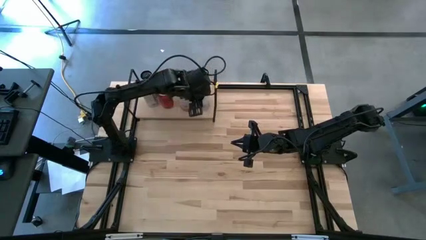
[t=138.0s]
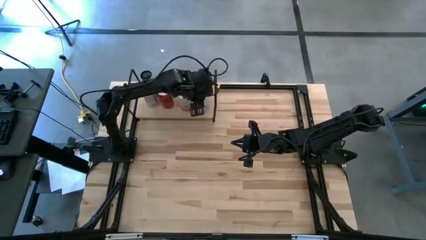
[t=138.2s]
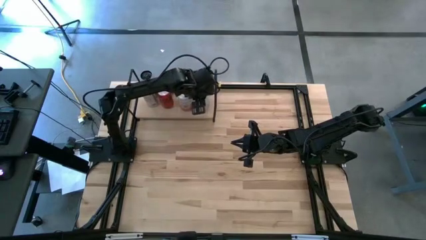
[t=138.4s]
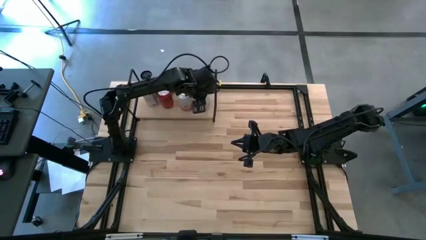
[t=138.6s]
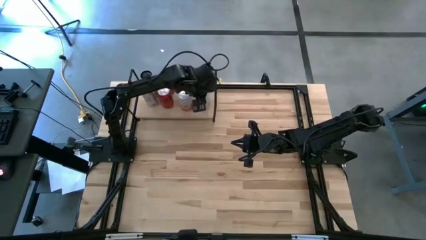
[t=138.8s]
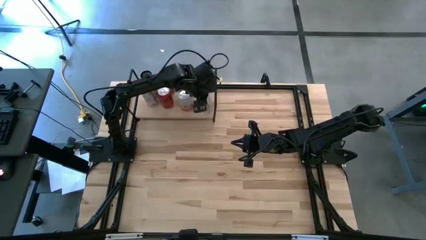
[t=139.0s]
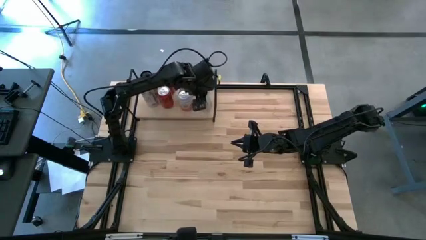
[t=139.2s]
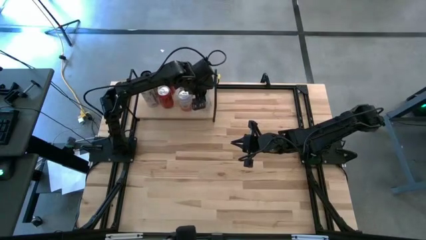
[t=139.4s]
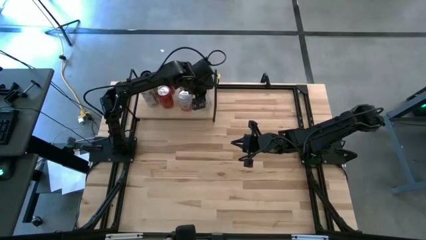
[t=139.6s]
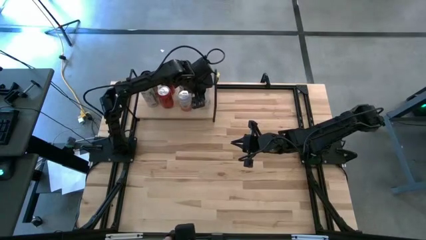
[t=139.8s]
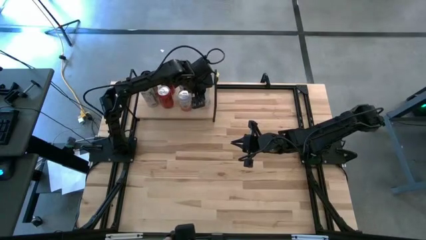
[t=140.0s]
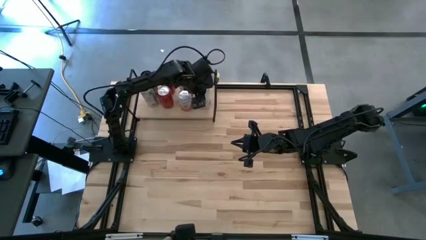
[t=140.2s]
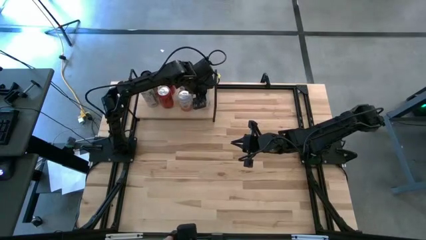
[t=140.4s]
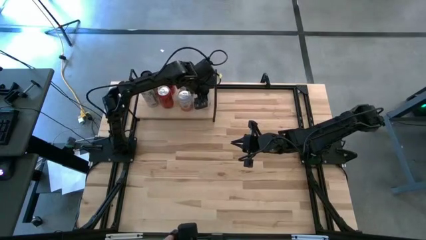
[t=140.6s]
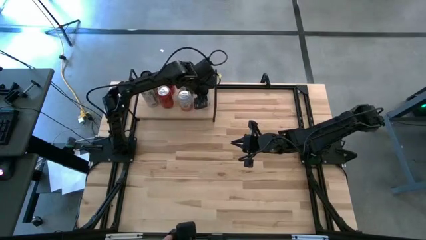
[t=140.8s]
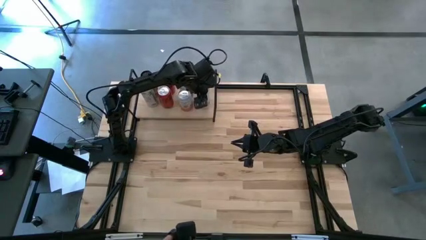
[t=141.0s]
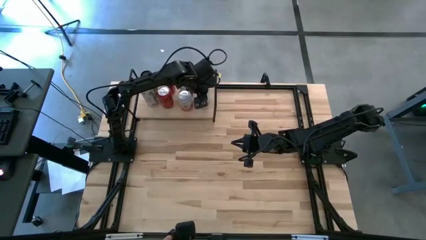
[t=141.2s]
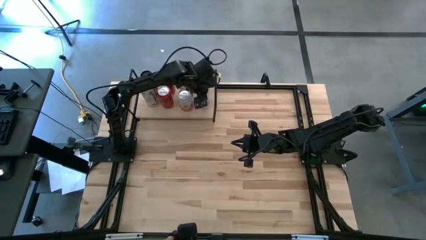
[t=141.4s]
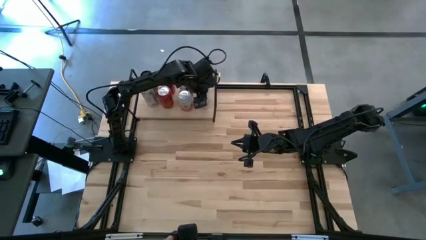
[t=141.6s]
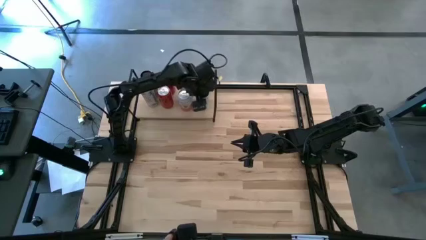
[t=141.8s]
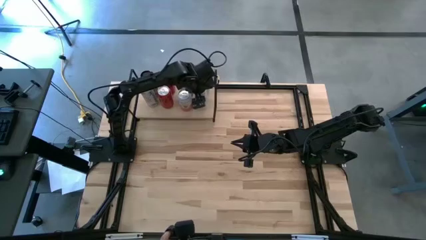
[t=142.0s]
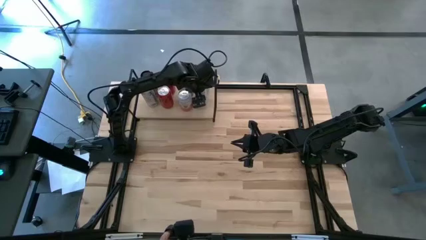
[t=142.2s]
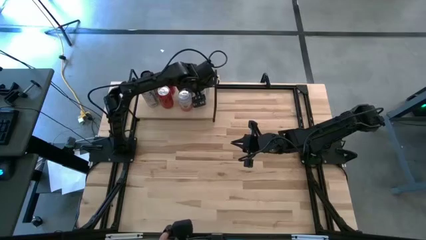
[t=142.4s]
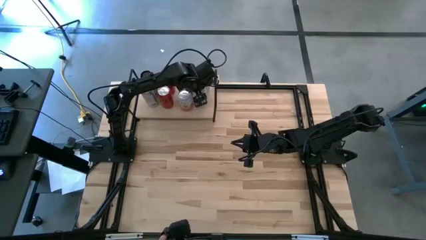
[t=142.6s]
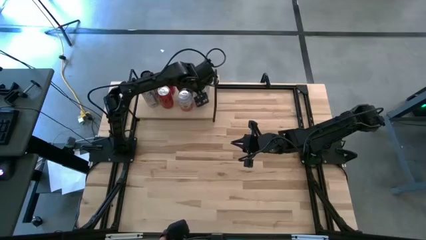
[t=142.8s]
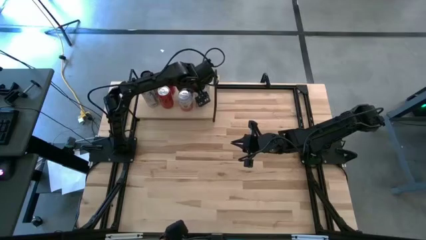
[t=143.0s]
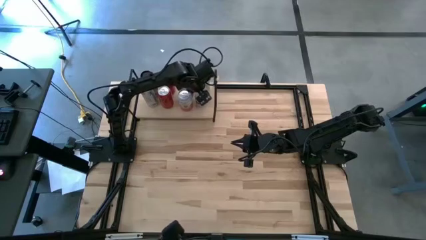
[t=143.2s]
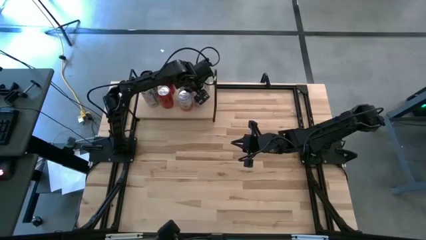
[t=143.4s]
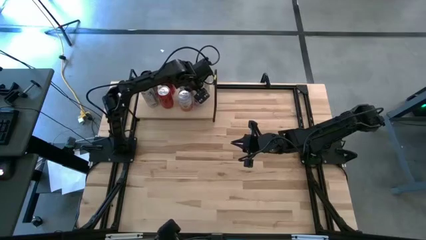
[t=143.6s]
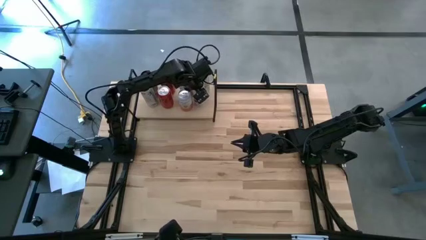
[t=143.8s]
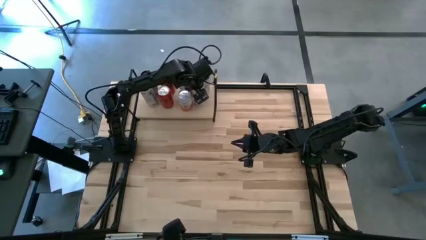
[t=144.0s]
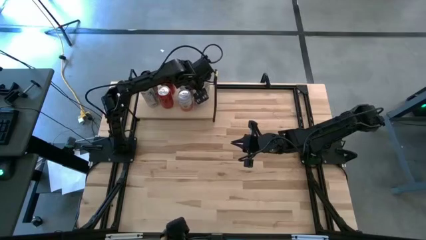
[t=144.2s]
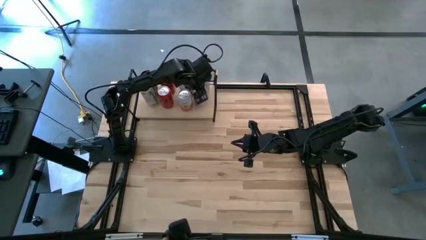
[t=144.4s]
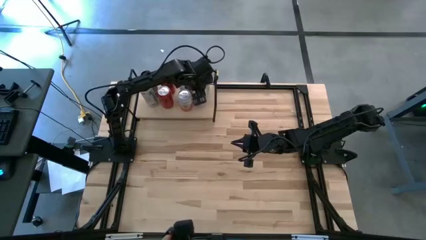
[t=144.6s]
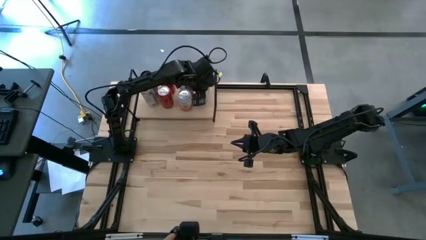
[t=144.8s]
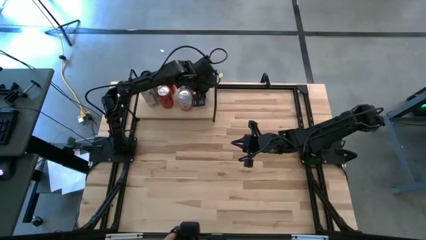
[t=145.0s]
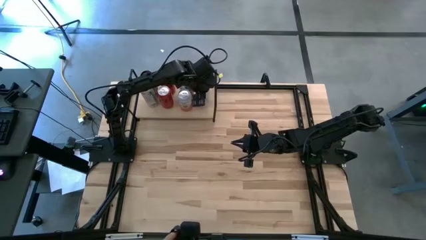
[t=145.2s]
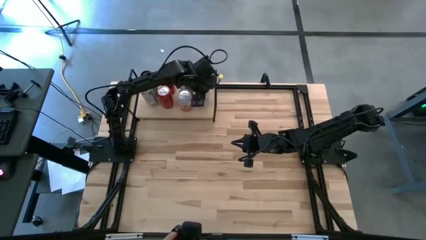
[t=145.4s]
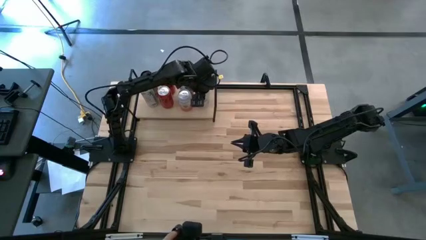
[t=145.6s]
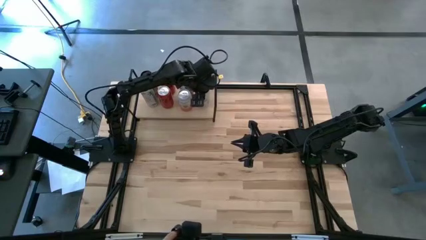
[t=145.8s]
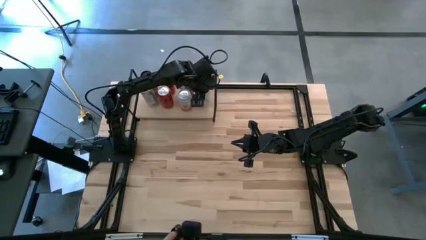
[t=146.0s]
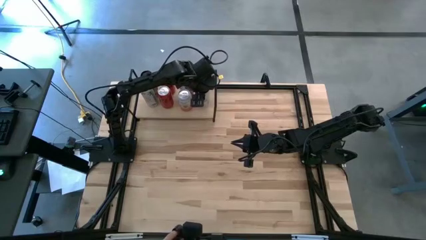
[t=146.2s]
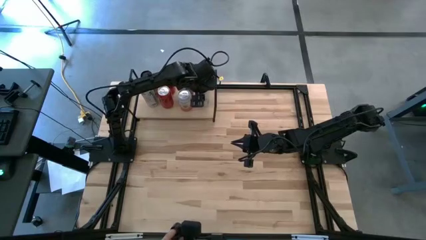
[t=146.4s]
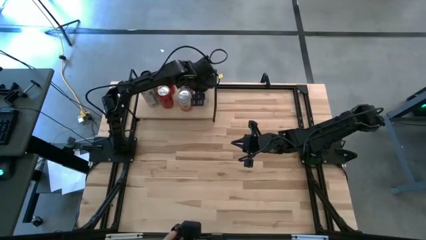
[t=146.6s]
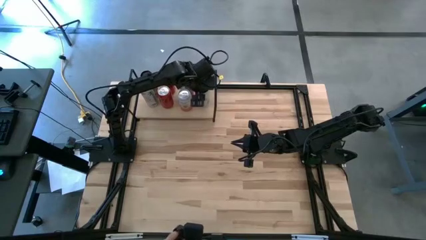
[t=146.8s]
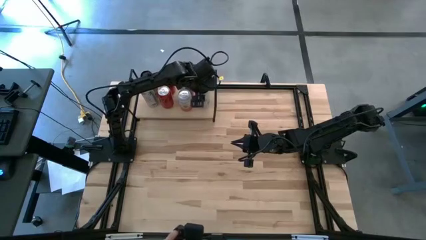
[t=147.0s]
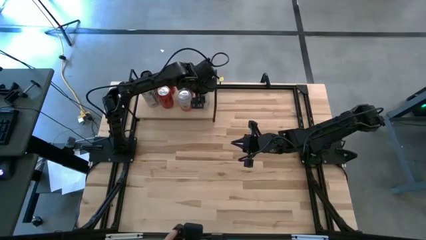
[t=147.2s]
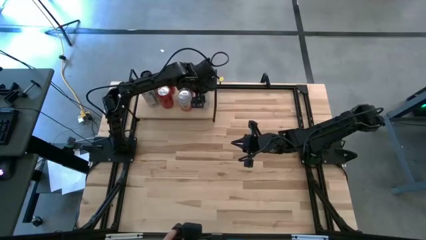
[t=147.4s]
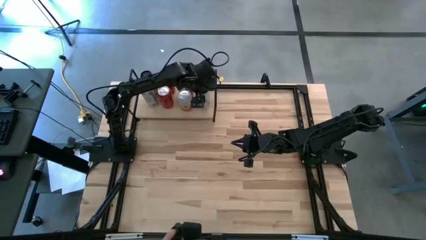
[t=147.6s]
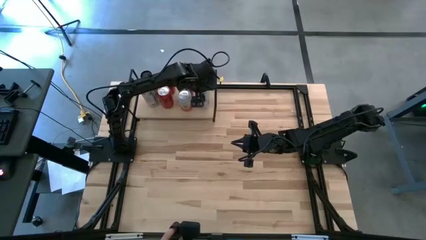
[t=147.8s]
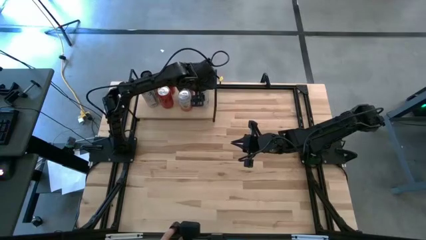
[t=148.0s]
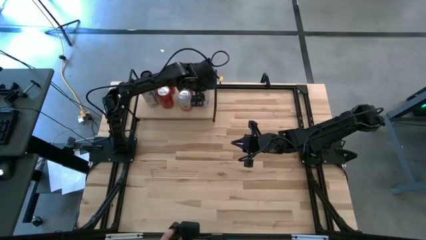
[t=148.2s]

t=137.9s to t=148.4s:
Task: Place canned beverage on shelf
Put the white-blue soda can on the shelf aligned with the other white-blue soda can

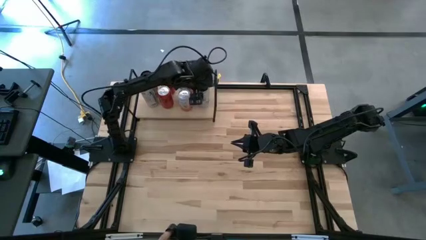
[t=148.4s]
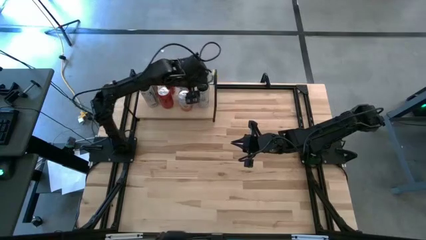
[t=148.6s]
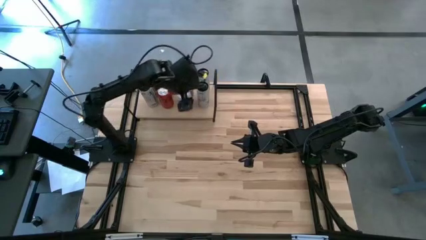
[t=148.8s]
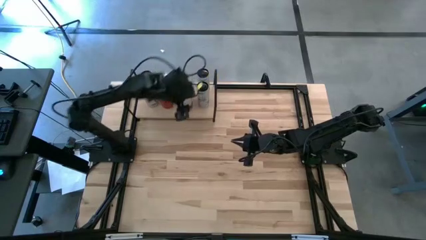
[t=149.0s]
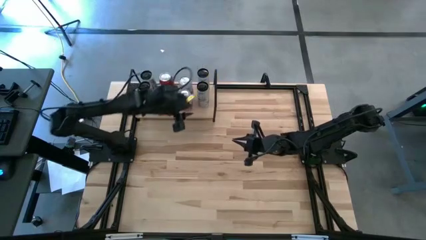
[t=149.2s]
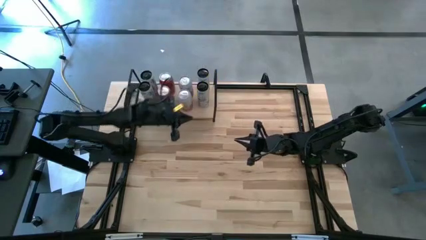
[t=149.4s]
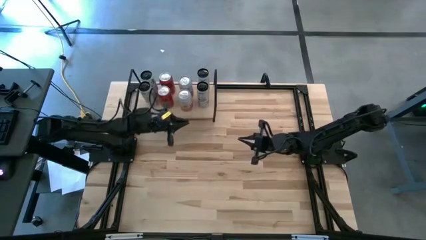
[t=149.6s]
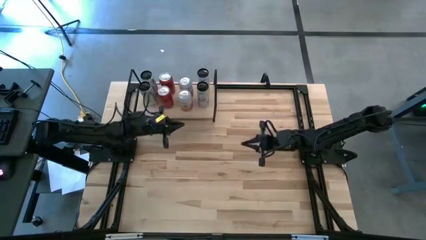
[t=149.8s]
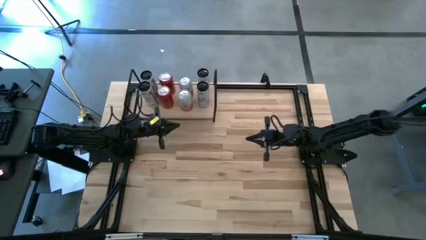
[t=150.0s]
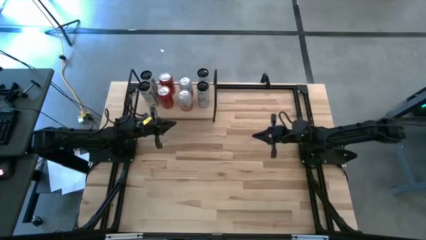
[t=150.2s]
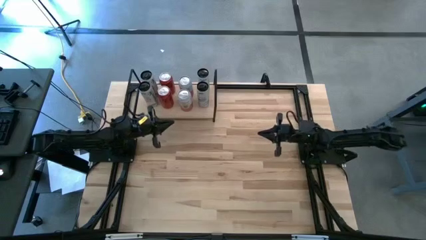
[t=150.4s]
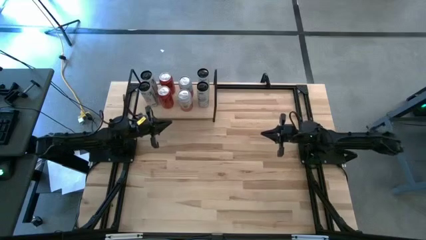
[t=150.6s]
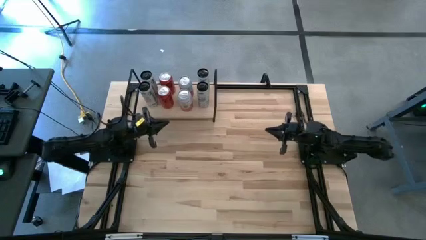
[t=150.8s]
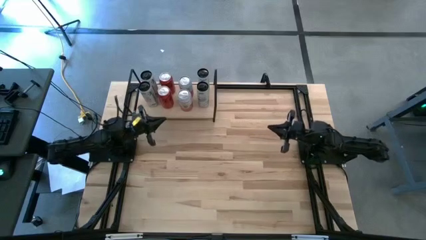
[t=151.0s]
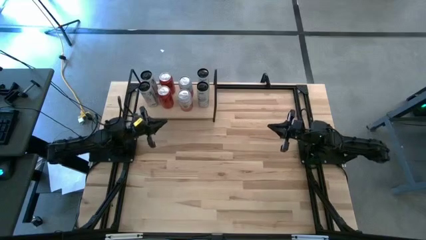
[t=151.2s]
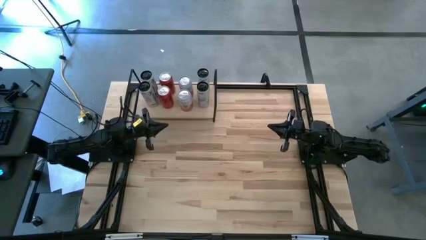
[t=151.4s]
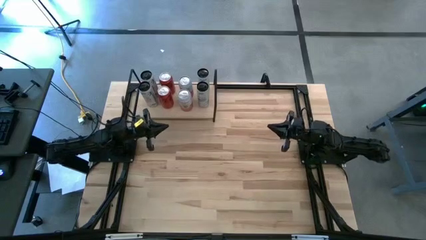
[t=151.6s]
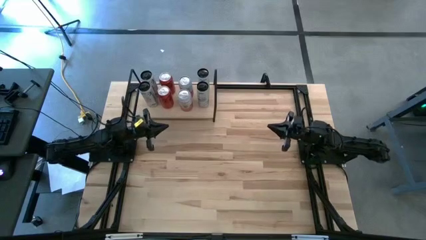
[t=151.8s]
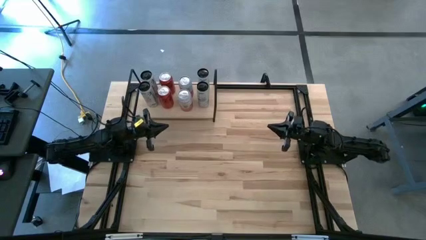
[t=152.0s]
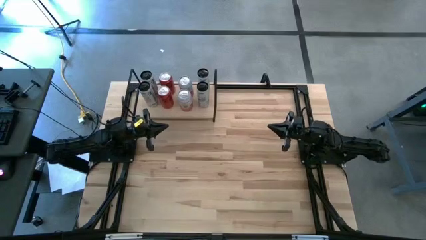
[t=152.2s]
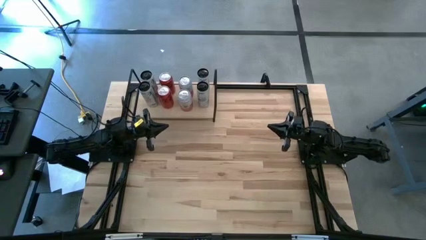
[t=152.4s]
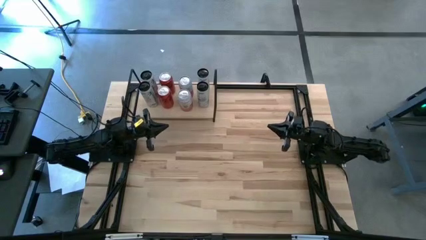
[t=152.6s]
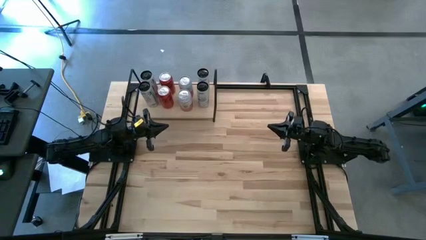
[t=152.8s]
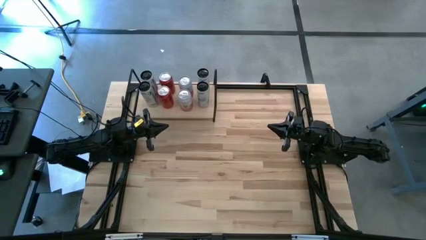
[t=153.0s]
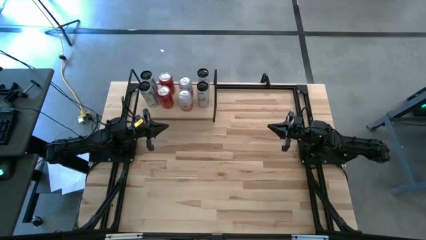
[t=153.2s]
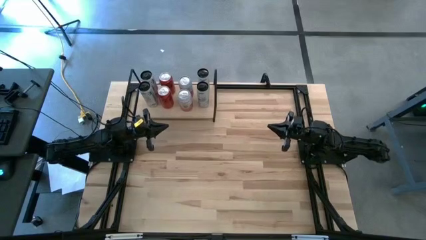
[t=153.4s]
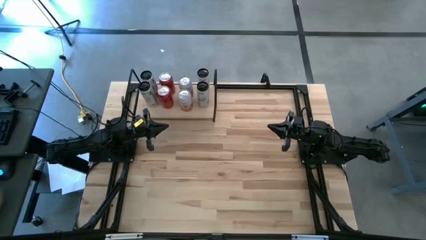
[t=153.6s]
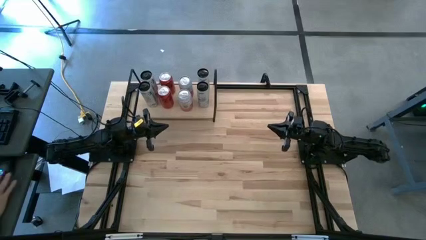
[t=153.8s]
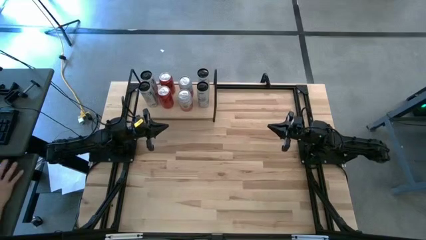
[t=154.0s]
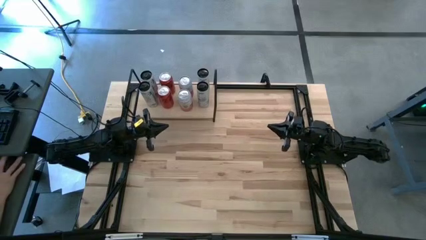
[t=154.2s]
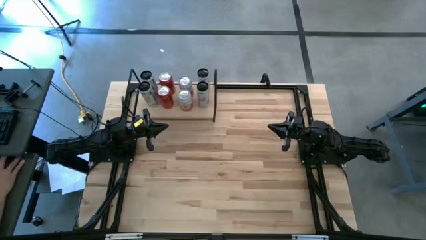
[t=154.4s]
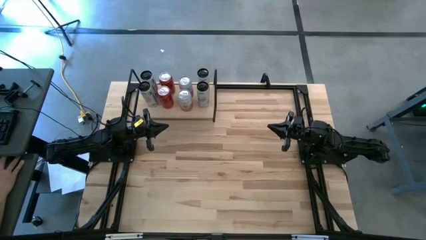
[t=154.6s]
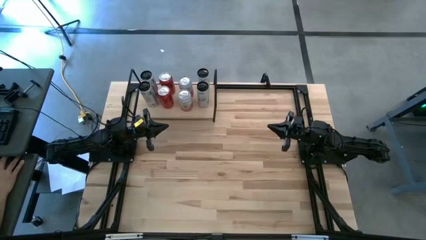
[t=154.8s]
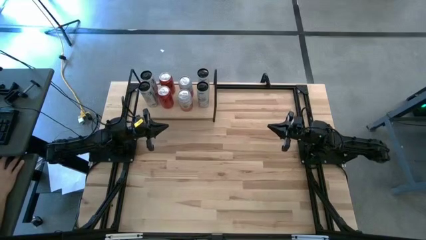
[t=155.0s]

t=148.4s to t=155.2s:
Return to Home Position
